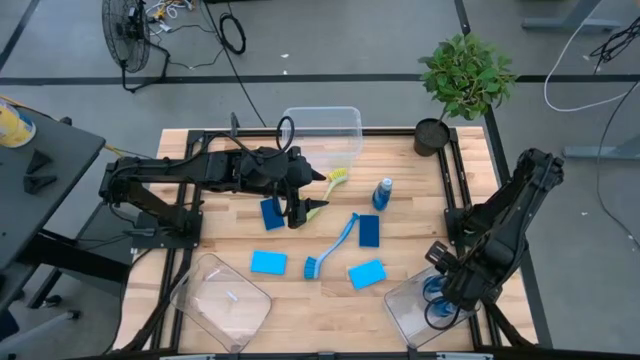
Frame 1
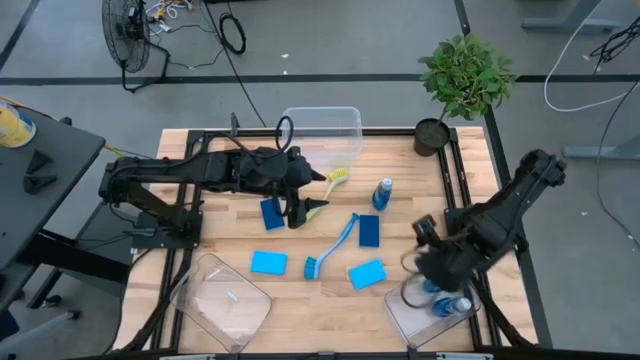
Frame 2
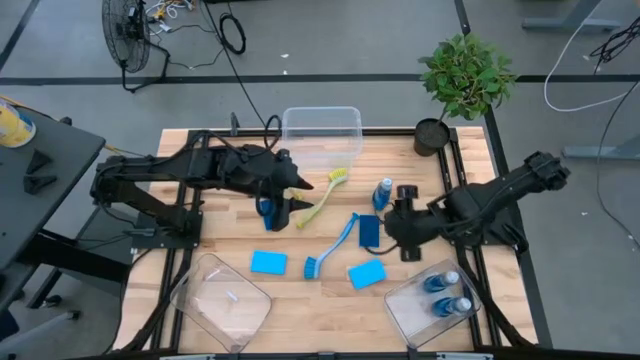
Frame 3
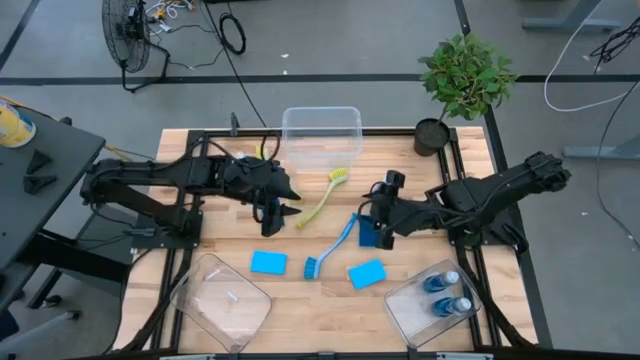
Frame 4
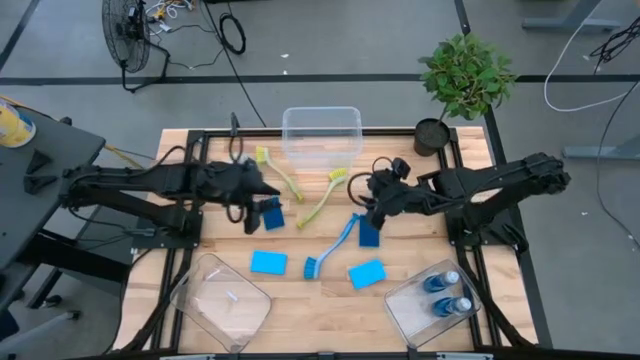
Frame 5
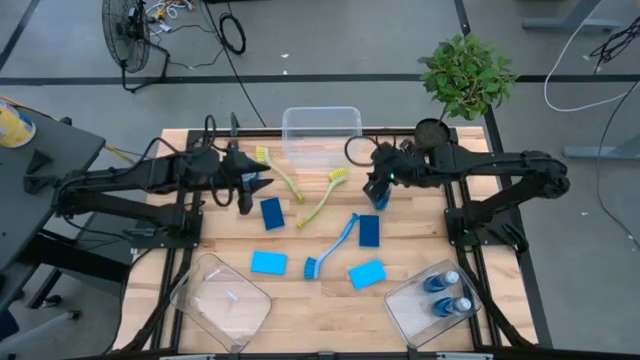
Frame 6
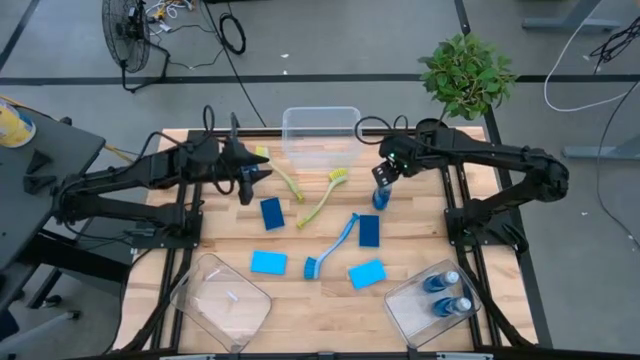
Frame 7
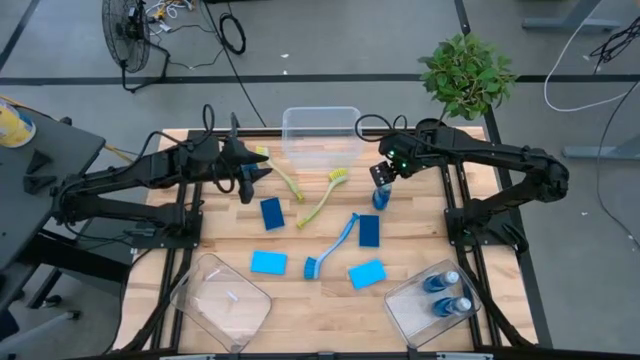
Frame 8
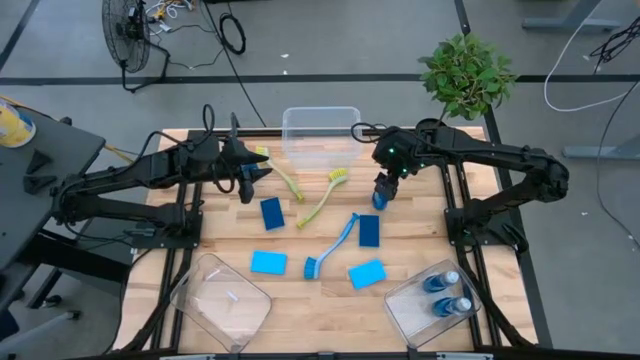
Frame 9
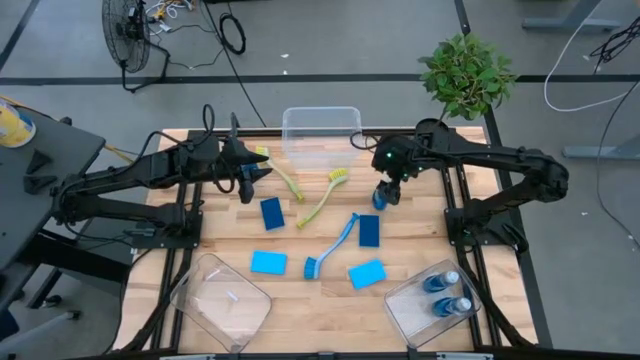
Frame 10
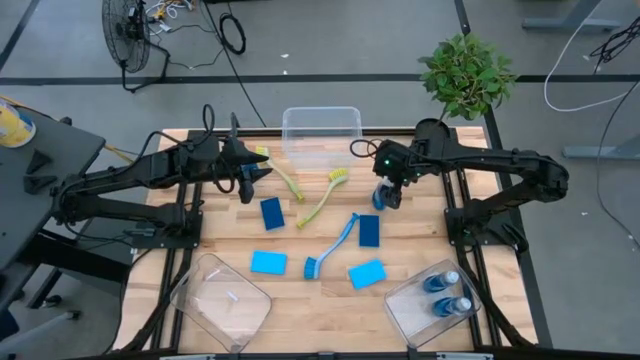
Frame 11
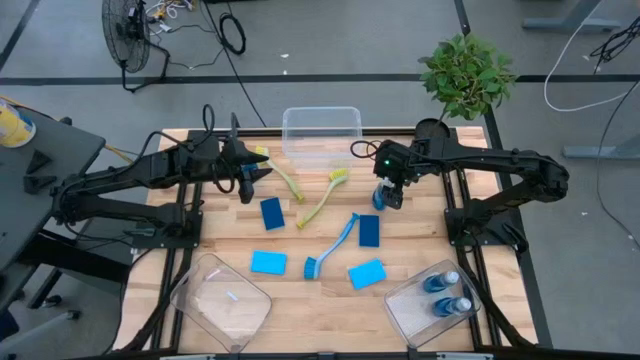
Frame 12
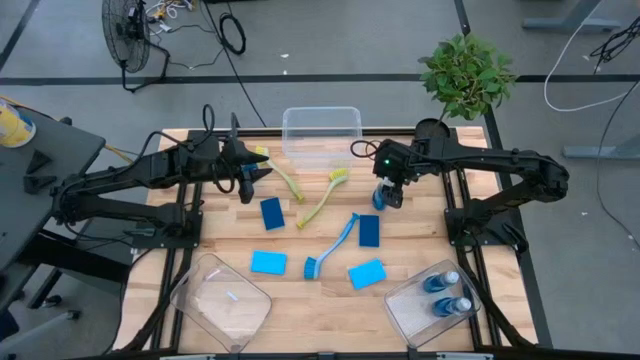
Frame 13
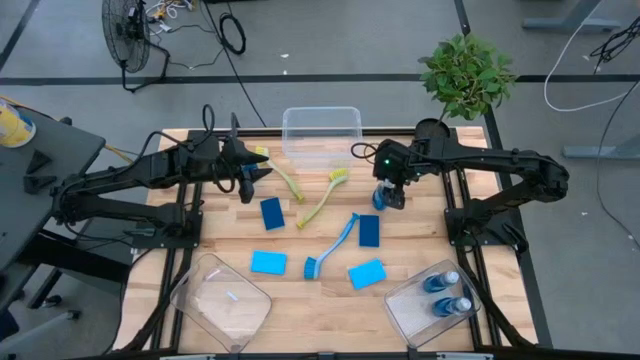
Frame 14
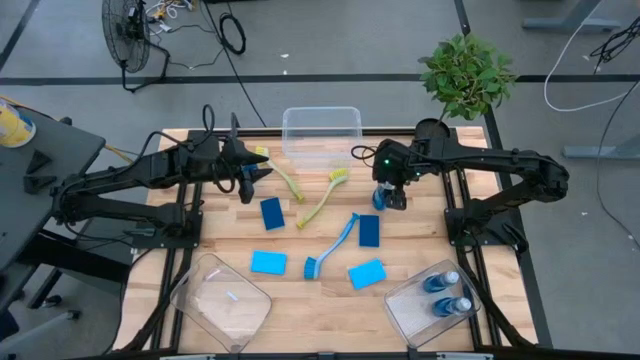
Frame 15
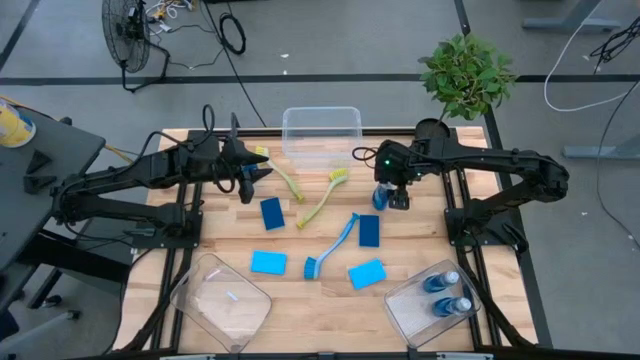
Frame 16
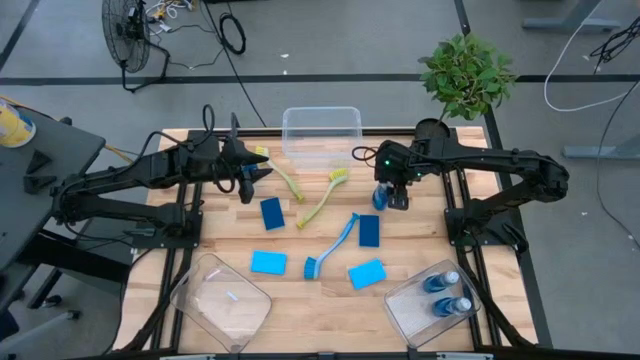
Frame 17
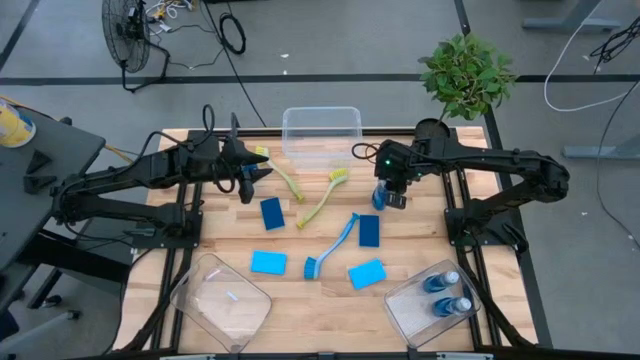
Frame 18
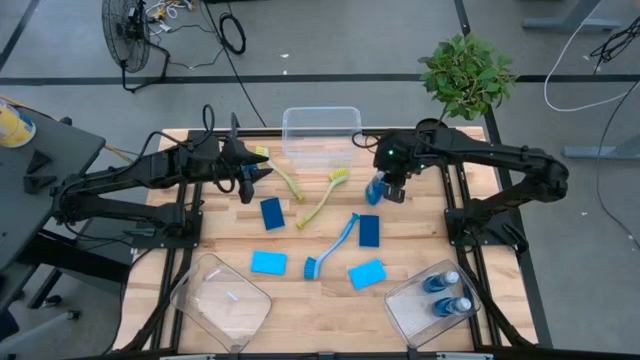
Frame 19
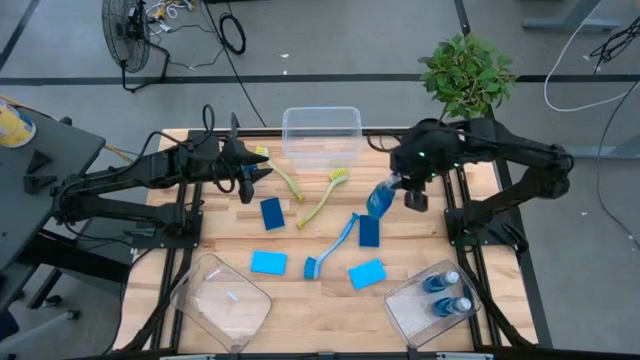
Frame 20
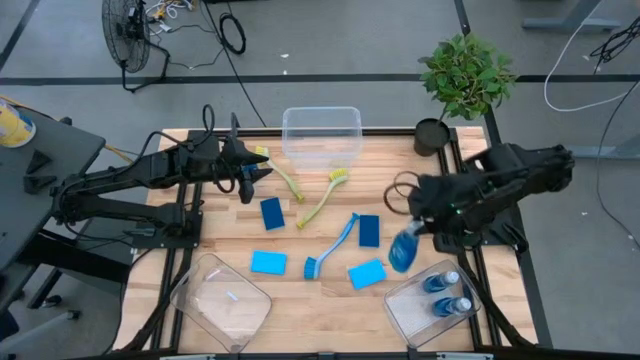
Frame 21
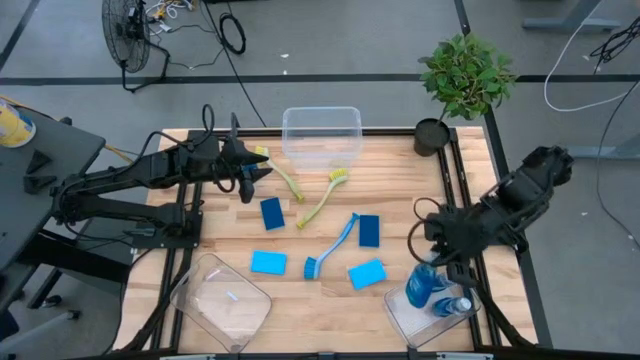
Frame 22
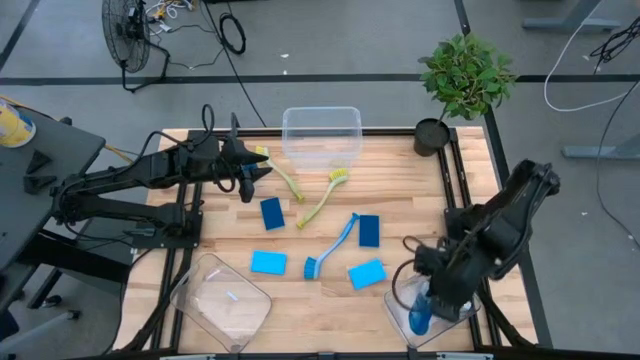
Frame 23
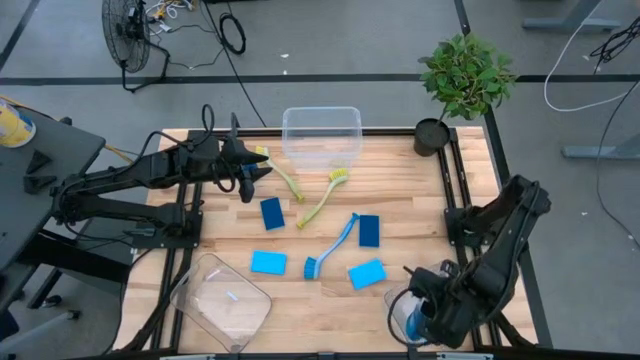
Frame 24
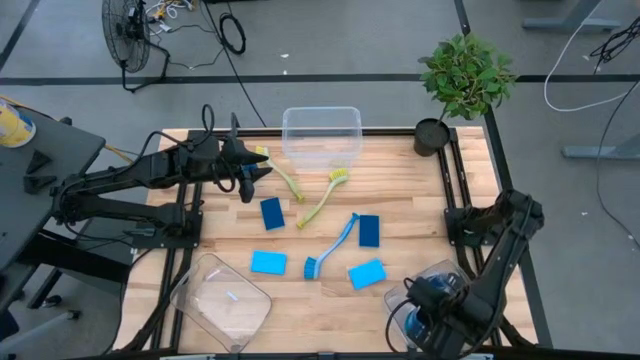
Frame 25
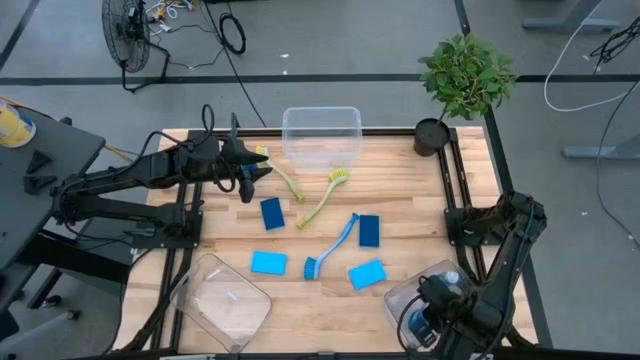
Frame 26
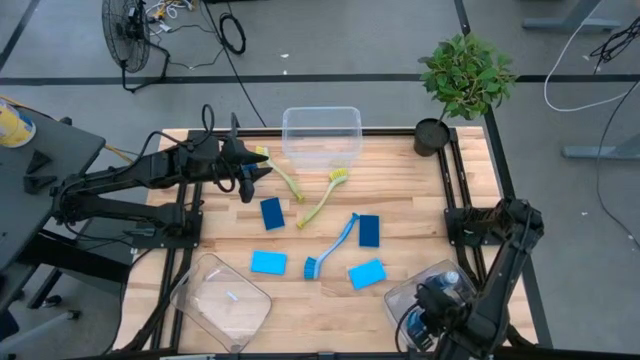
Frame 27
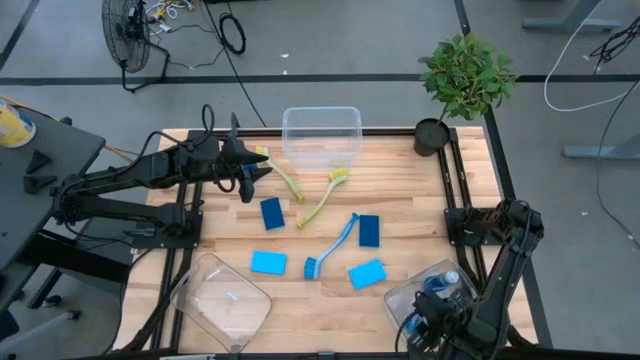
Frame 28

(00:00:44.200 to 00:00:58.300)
Task: Pick & Place Kitchen Sink Supplies
Put the blue dishwashing liquid into the bottom right transparent bin

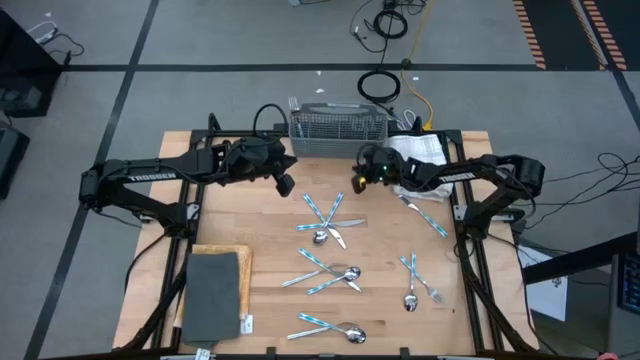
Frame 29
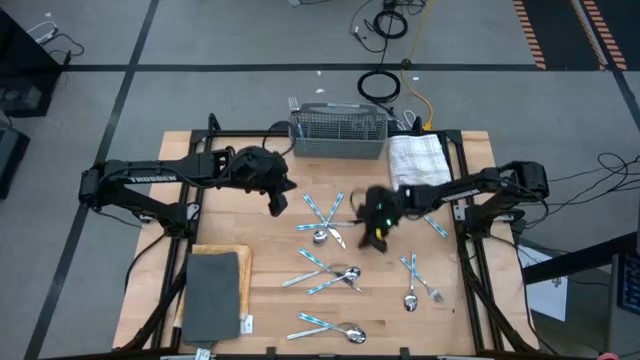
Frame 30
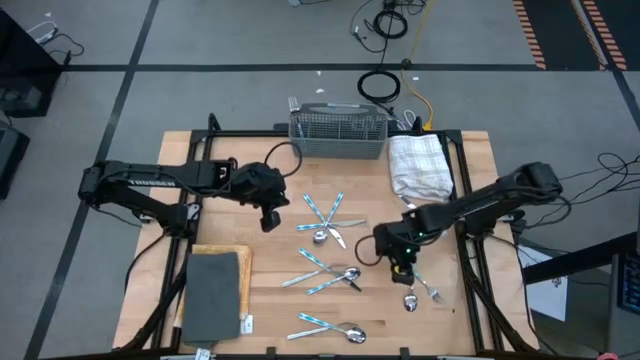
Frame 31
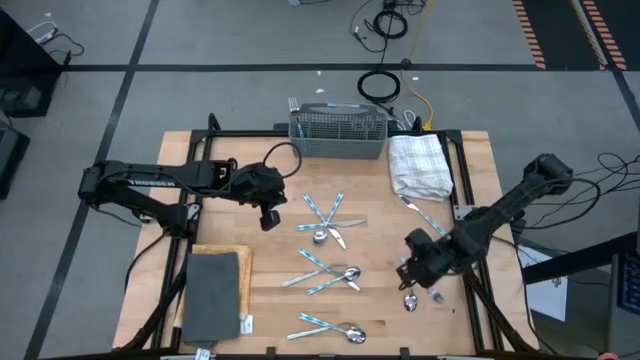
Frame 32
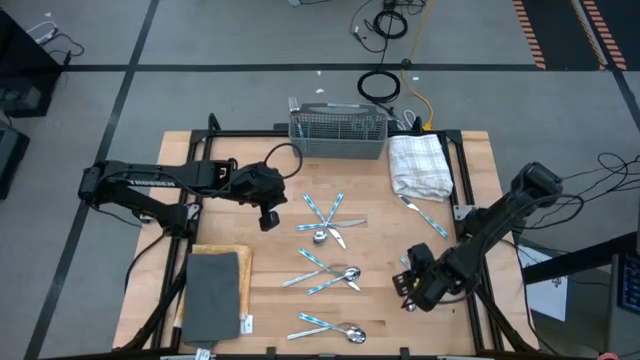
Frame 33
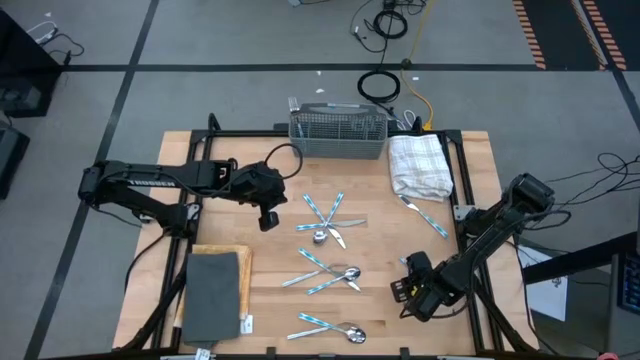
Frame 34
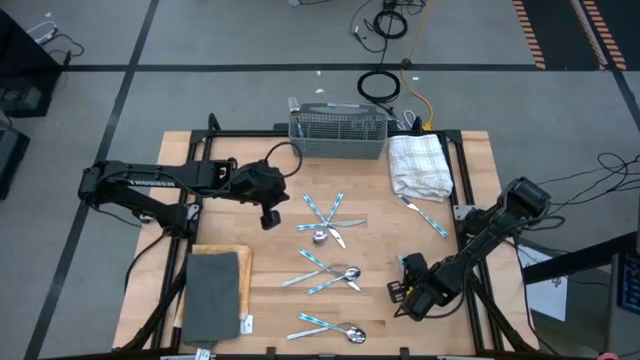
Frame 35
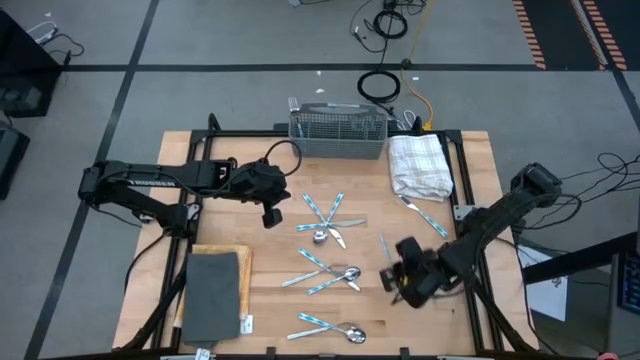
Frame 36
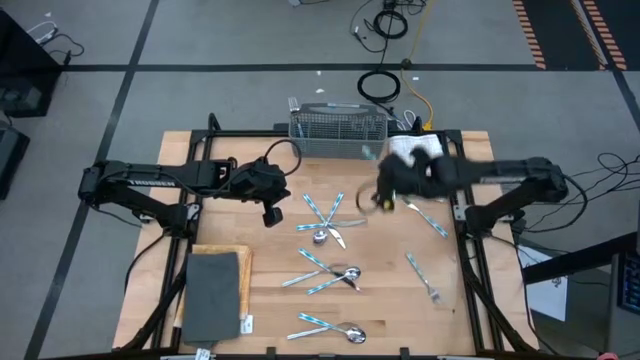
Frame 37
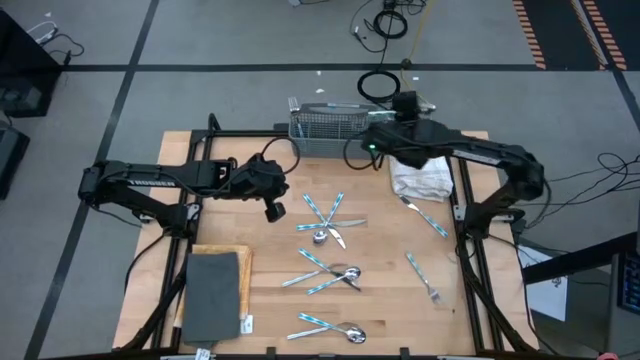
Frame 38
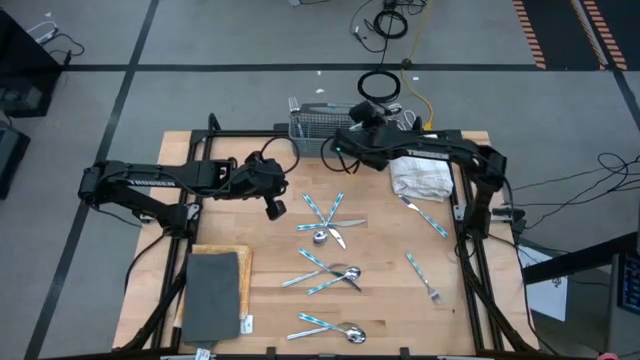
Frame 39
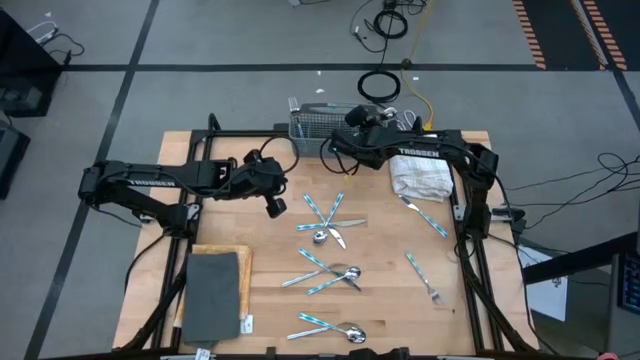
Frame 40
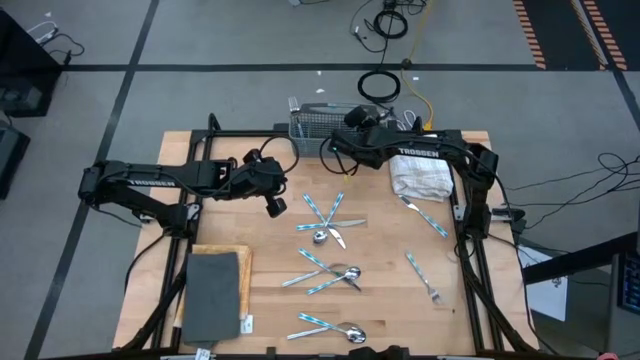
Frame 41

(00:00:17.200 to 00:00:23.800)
Task: Sort silverware
Put the spoon into the silverware basket
